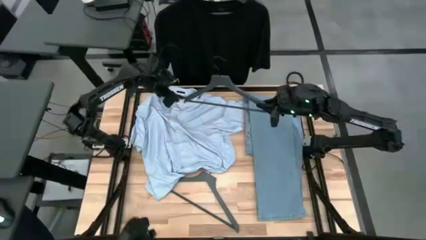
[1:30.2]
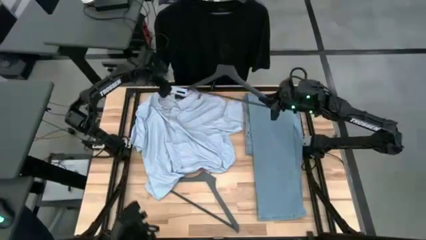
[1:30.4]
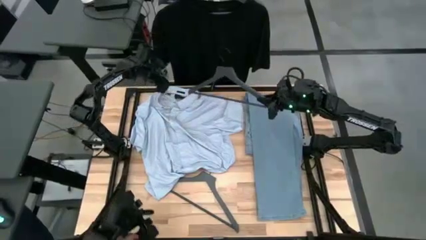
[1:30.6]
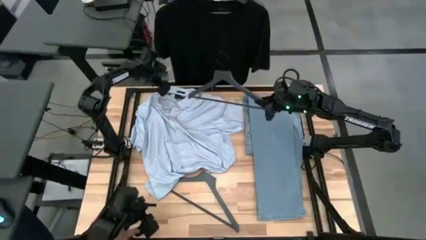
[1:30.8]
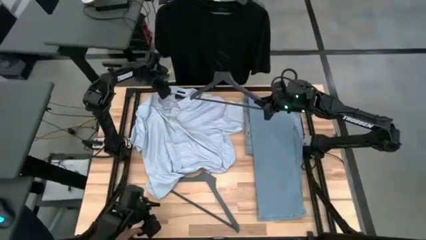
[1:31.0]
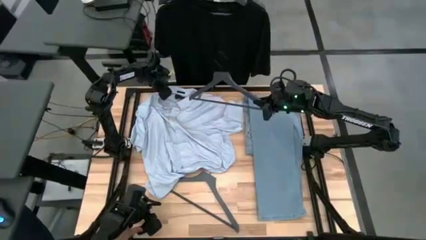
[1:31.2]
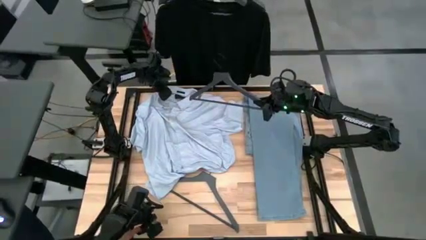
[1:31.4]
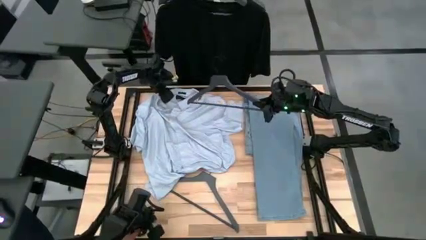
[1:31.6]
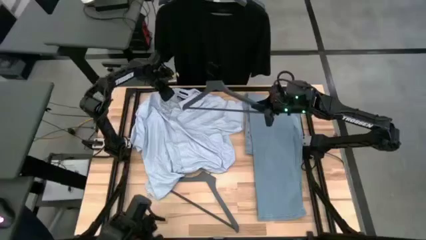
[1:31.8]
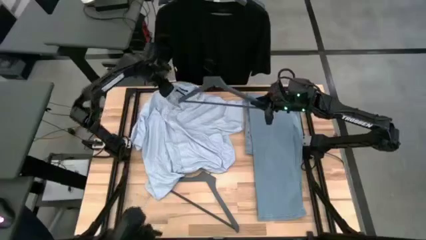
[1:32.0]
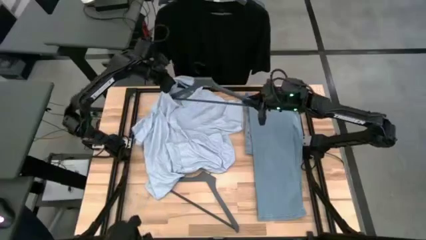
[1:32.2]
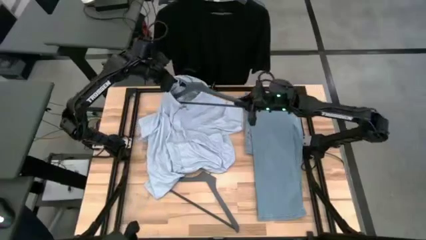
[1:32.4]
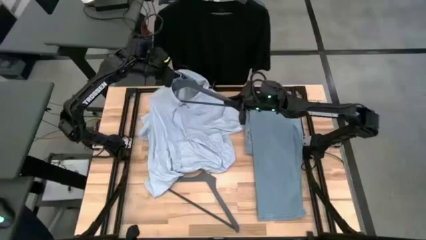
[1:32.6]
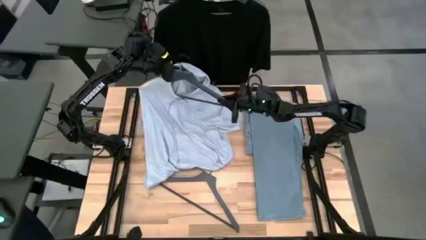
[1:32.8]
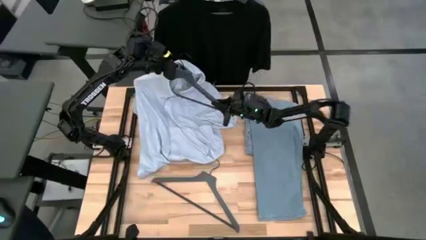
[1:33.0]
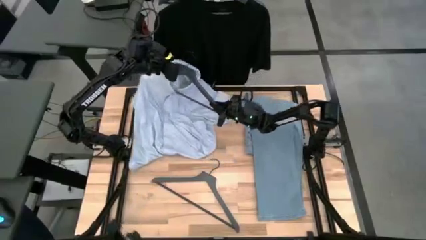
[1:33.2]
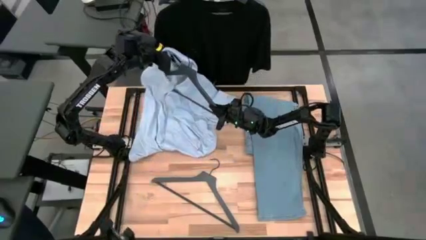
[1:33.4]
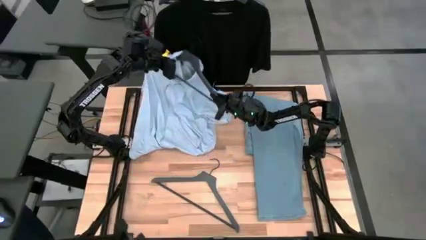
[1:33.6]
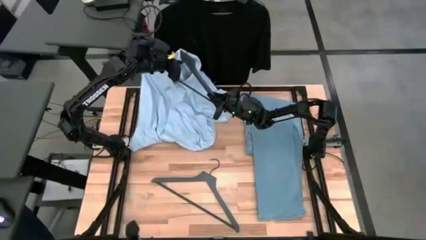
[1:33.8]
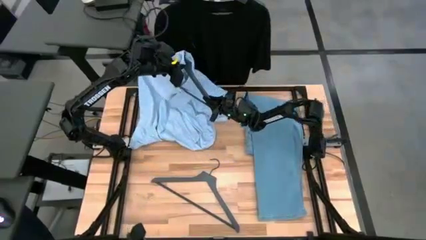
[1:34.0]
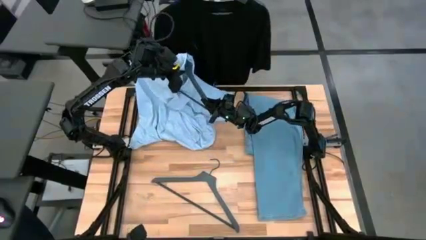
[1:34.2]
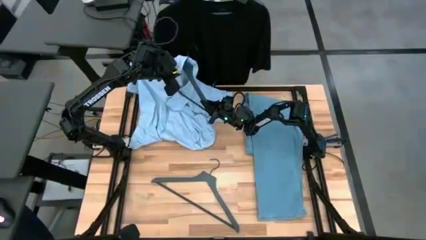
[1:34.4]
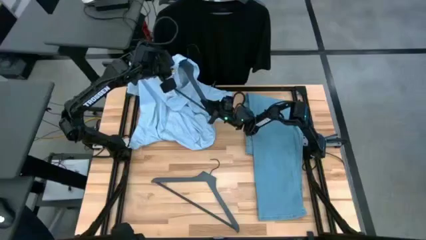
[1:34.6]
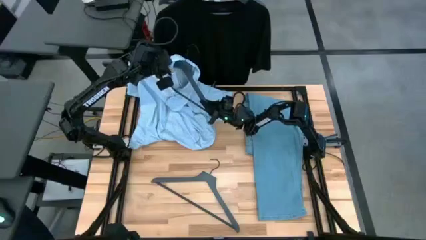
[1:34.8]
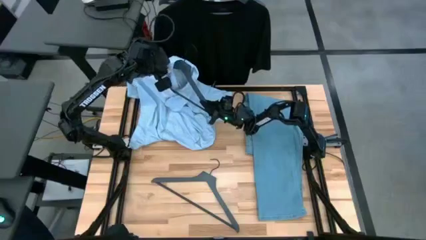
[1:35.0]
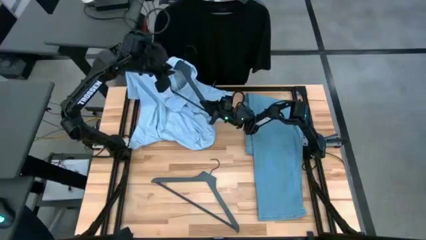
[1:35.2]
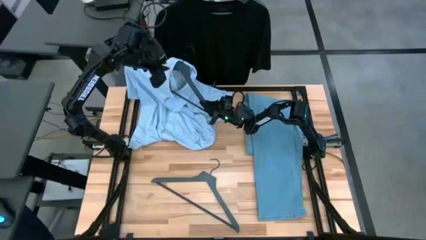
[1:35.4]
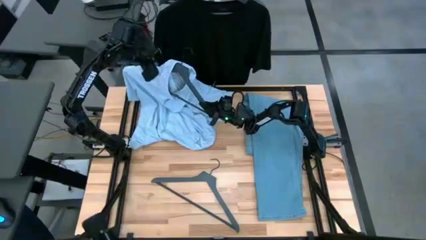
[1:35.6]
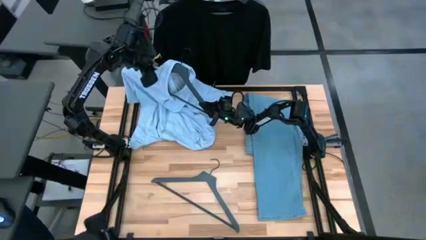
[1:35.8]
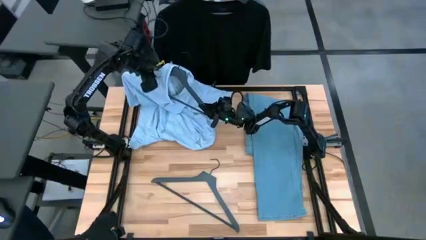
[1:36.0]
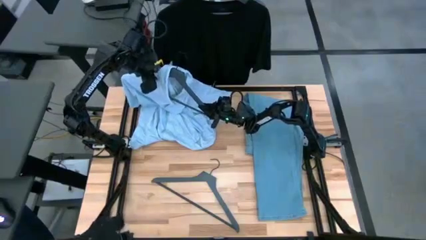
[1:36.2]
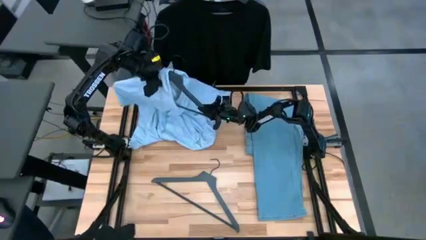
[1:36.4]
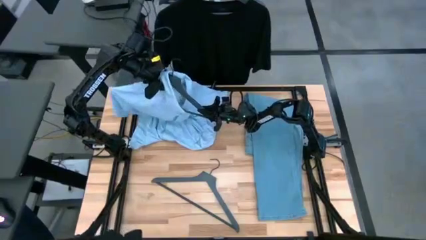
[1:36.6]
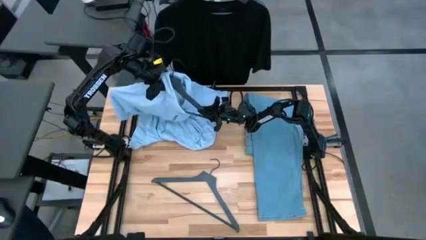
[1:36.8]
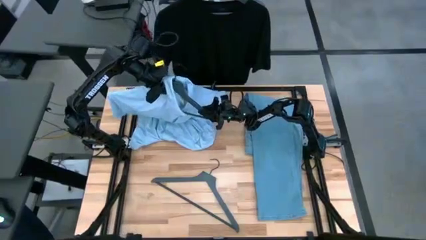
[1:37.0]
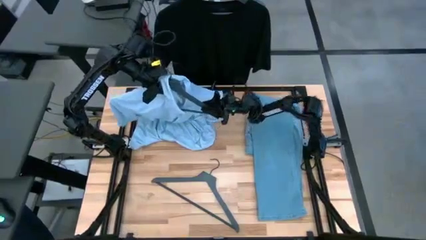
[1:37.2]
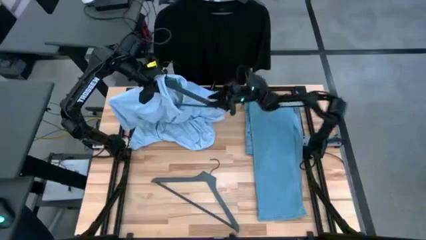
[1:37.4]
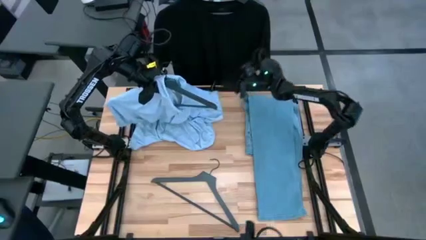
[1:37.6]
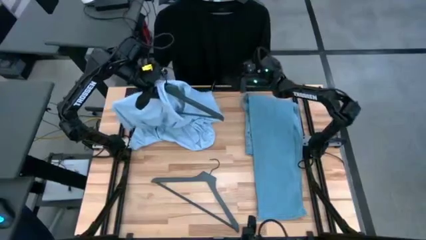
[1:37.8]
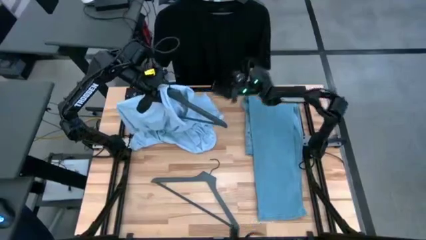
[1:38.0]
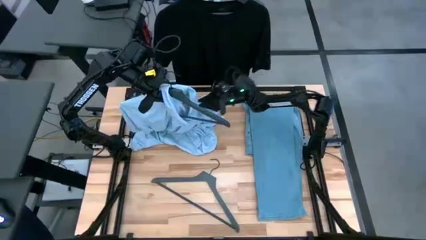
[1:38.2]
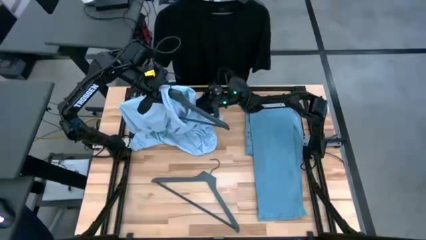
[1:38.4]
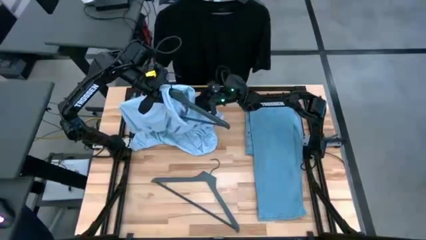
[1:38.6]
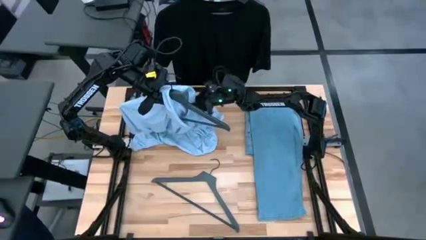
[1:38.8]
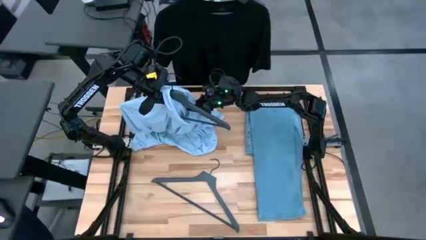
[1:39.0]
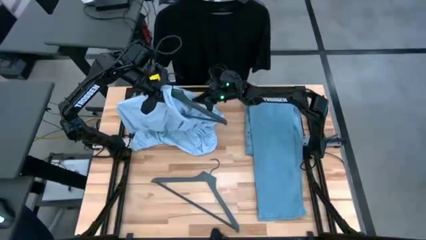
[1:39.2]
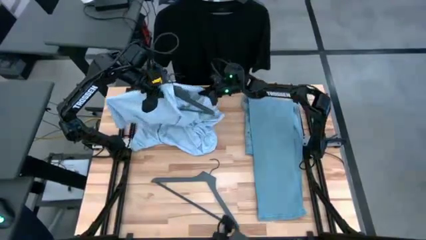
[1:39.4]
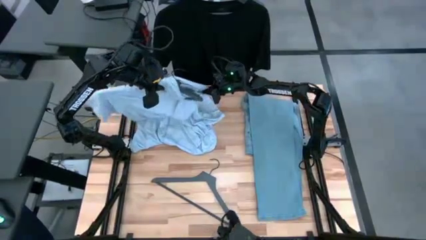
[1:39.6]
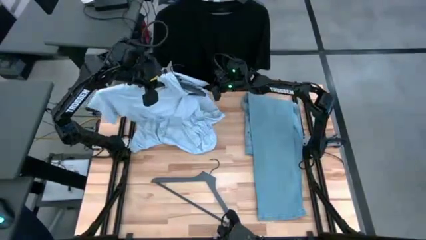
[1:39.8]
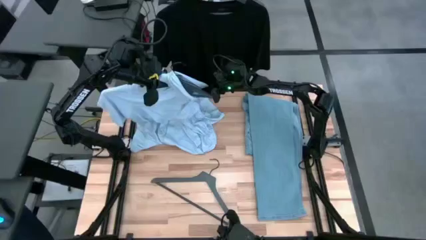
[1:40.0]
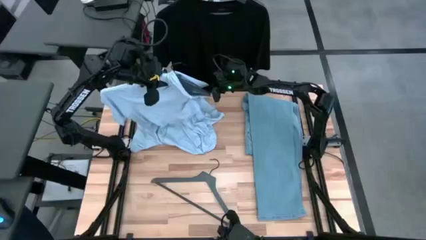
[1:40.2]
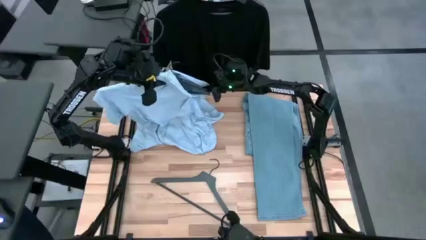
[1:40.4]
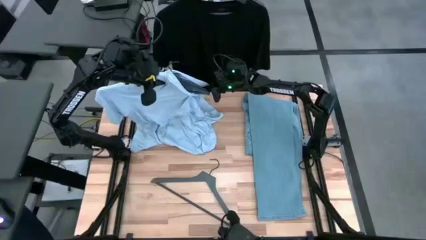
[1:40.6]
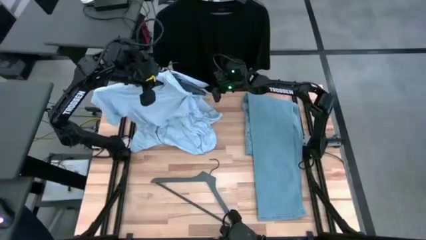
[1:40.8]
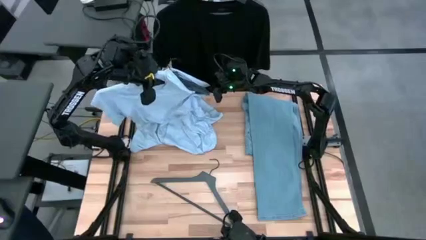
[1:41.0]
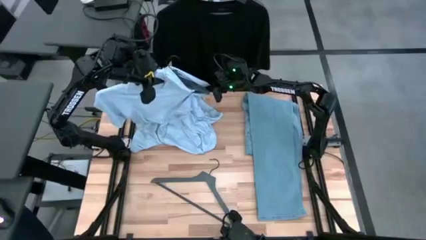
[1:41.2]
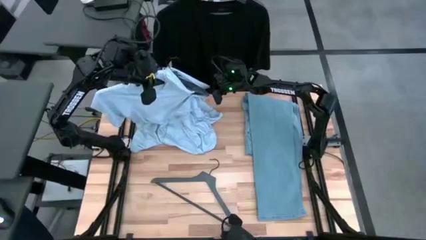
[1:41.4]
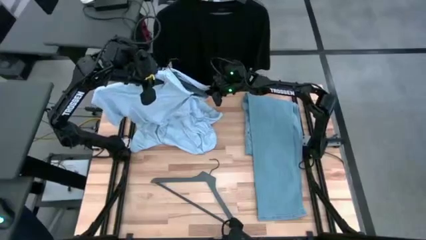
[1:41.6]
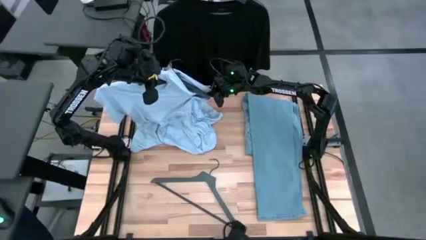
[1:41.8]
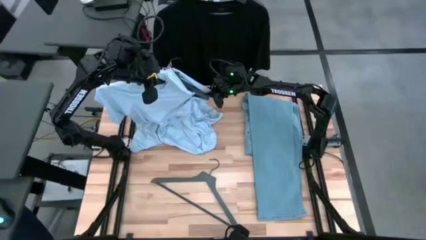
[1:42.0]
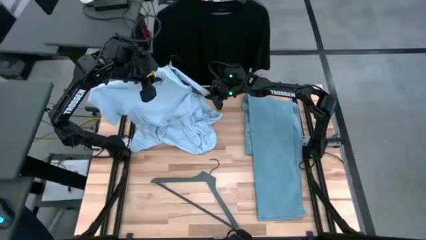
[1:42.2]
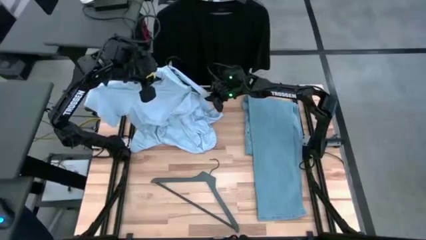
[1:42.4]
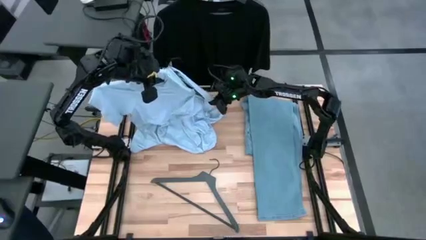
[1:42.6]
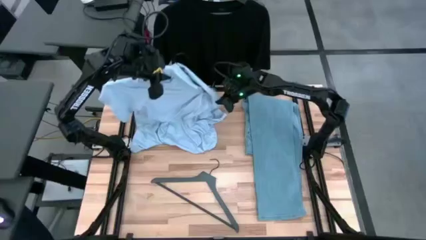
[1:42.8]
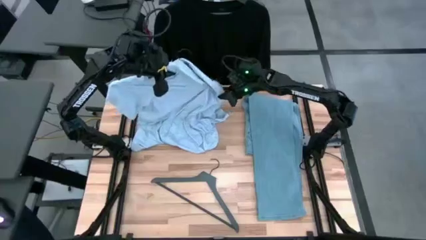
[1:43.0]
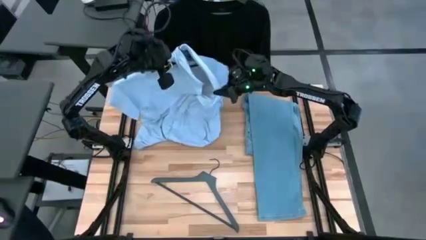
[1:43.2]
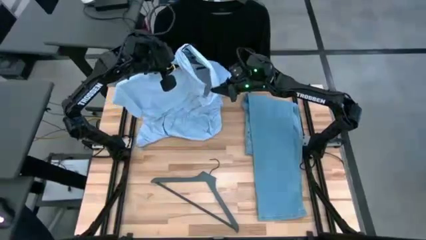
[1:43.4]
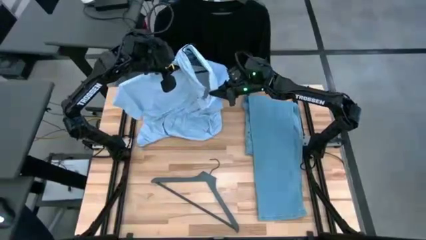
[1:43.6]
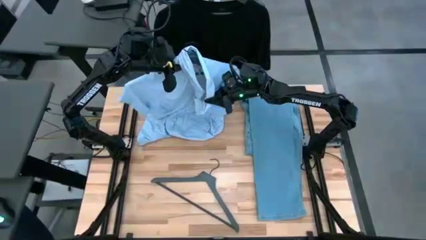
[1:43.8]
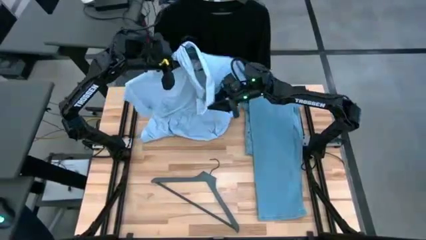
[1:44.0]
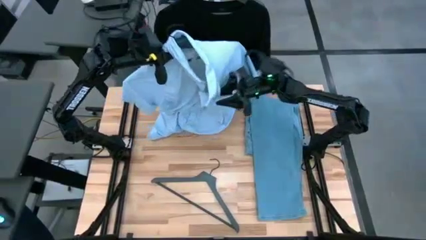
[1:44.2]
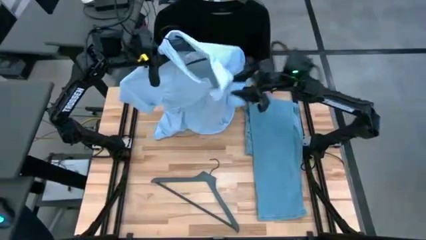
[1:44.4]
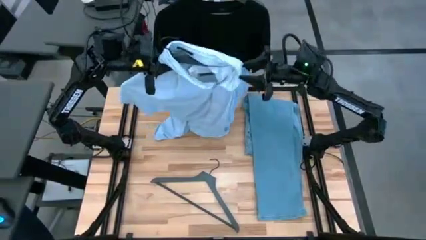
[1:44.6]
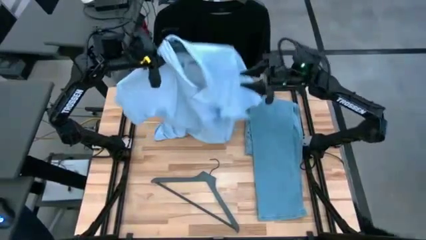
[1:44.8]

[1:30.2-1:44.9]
Task: Hang clothes
Insert the blue shirt on the grey hanger

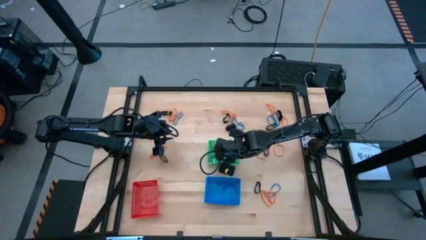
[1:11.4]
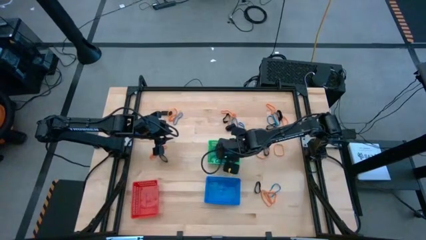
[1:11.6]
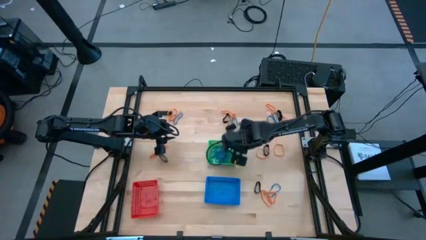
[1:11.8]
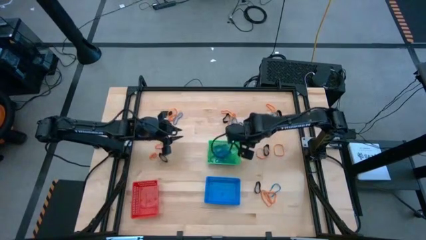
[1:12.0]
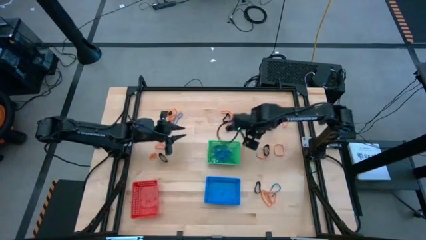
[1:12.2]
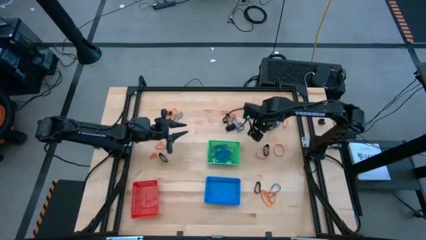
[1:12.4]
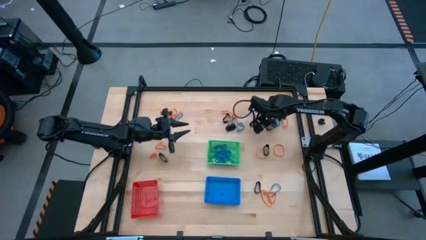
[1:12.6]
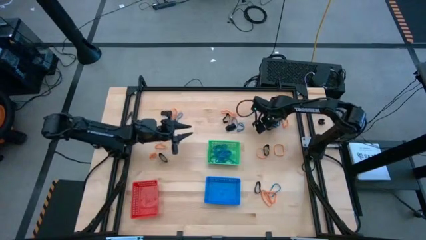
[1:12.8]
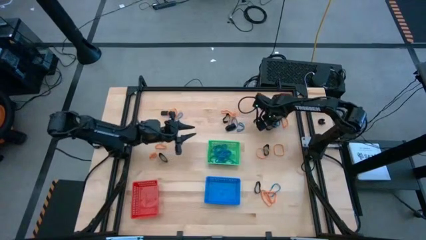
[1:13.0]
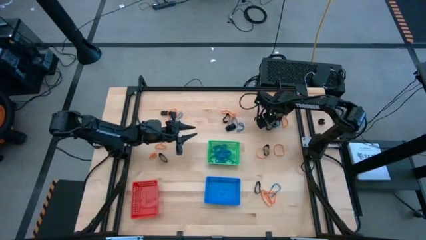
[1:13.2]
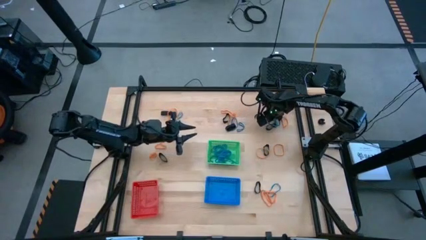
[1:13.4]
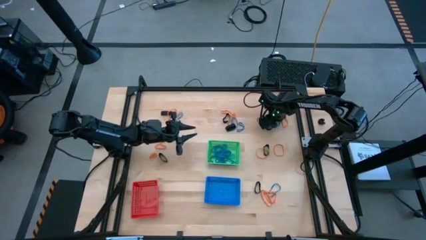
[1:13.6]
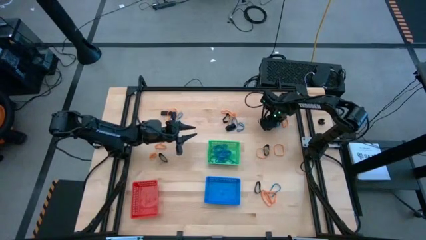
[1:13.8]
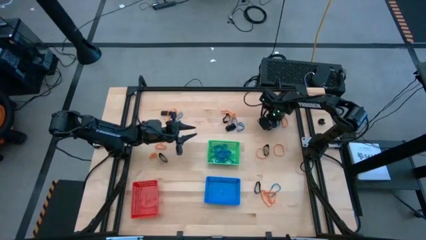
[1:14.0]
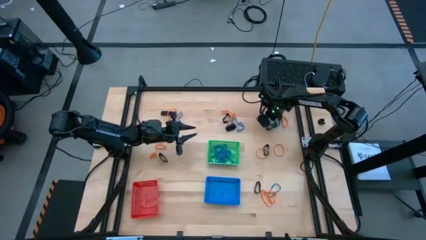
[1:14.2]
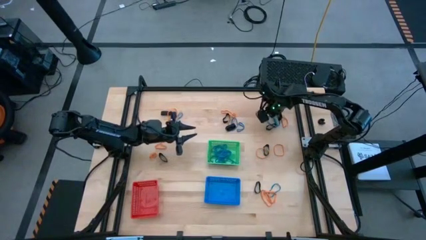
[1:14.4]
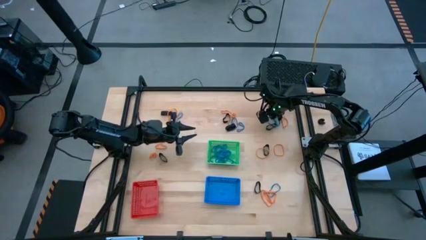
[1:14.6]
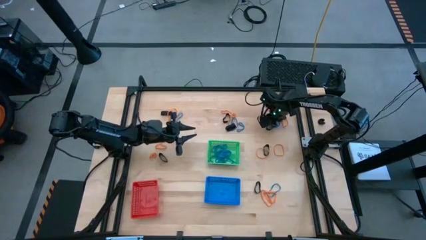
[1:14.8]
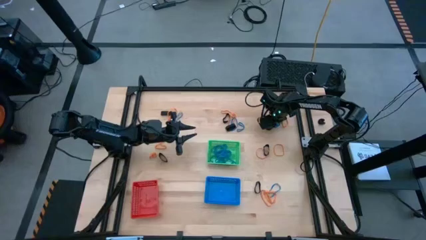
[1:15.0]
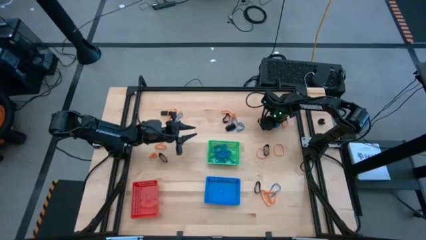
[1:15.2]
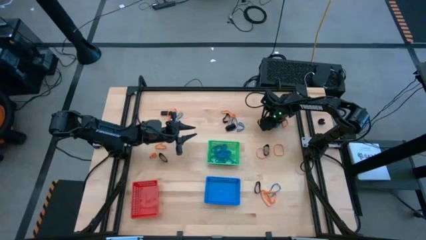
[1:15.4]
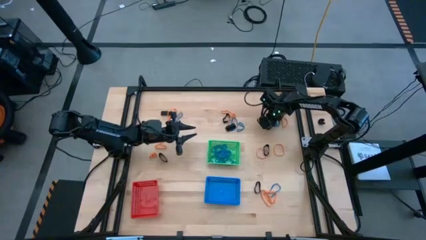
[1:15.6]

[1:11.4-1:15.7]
Task: Sort rubber bands into baskets
Put the blue rubberband into the green bin
